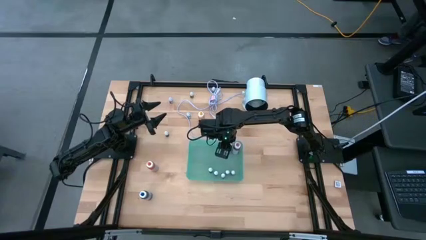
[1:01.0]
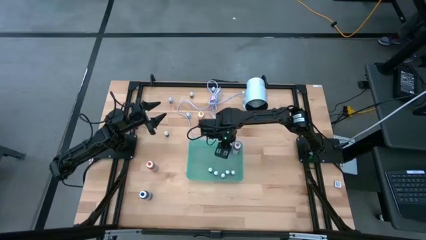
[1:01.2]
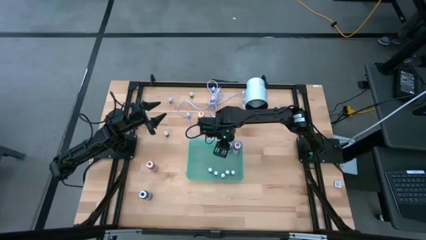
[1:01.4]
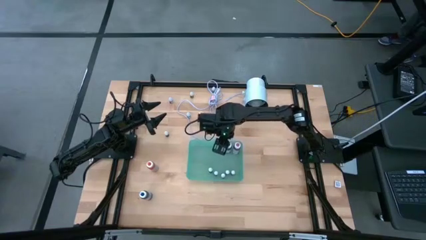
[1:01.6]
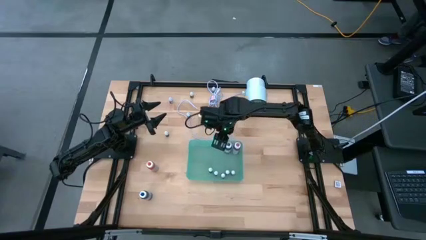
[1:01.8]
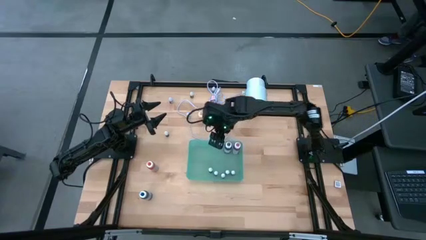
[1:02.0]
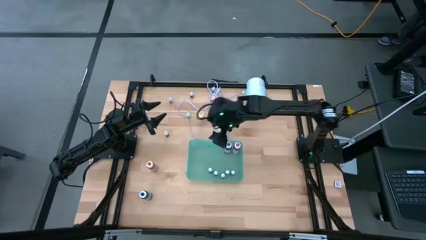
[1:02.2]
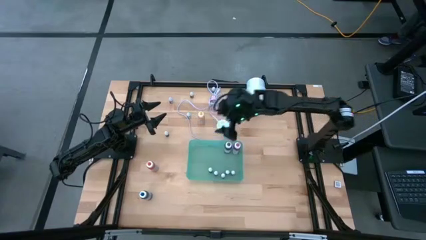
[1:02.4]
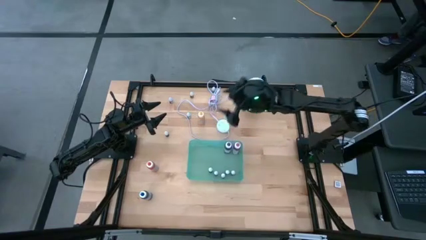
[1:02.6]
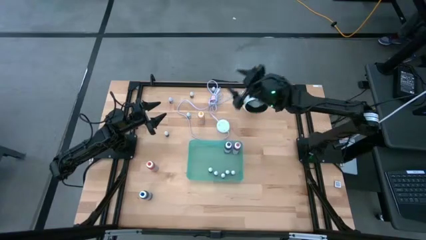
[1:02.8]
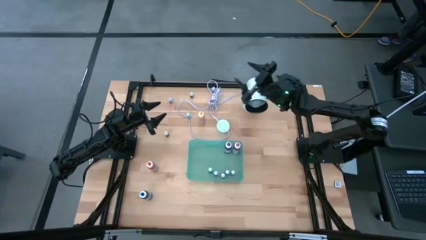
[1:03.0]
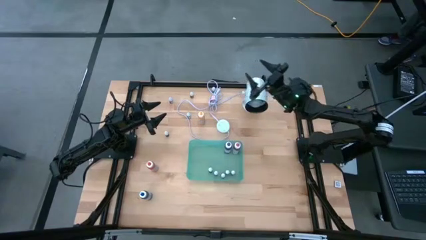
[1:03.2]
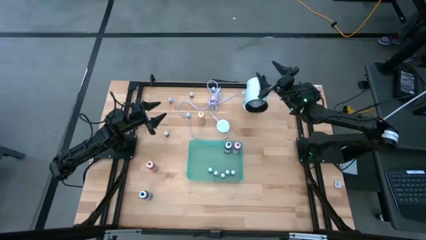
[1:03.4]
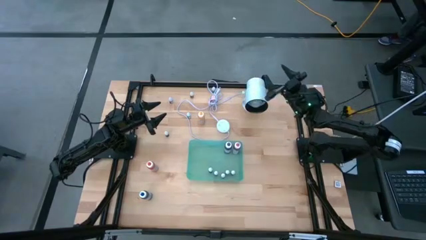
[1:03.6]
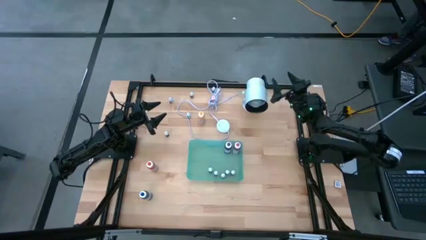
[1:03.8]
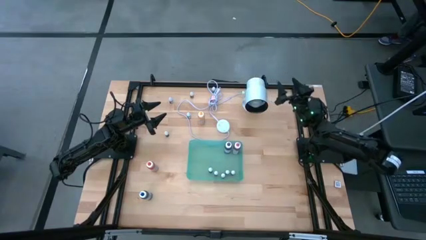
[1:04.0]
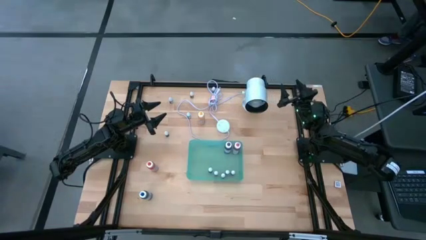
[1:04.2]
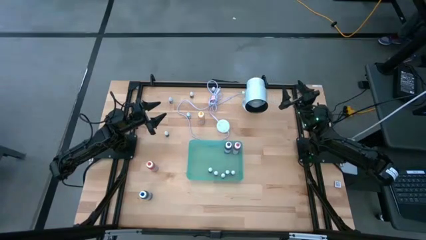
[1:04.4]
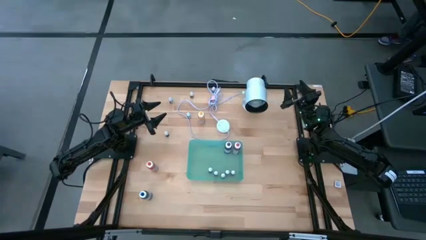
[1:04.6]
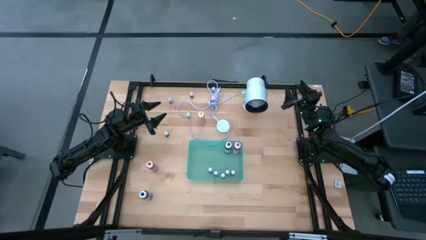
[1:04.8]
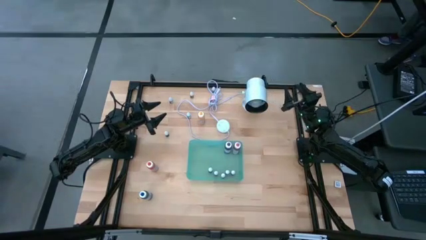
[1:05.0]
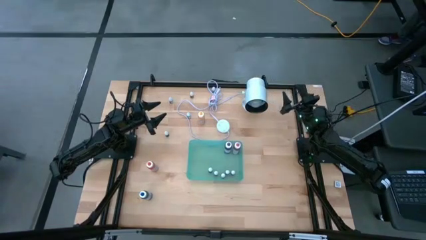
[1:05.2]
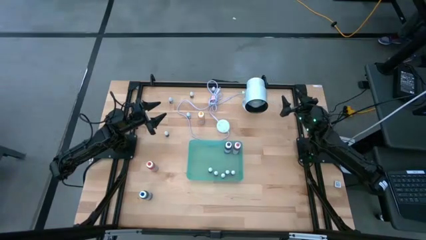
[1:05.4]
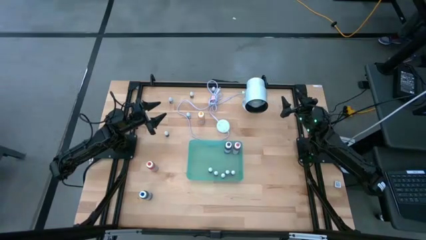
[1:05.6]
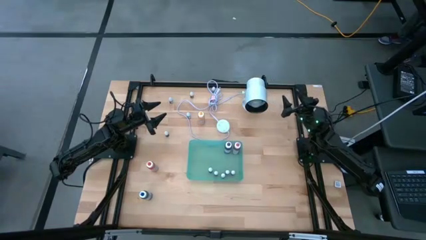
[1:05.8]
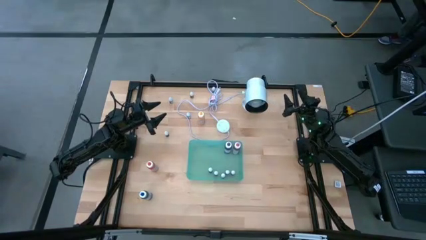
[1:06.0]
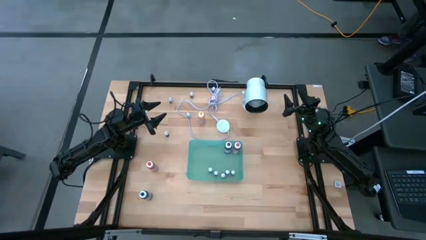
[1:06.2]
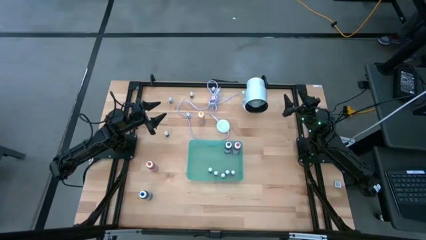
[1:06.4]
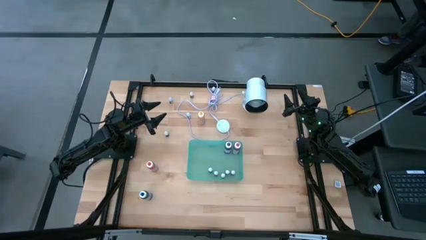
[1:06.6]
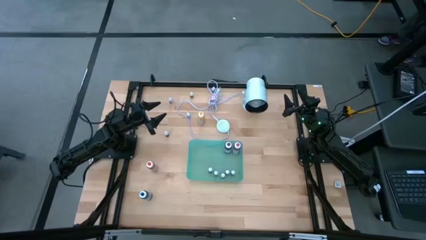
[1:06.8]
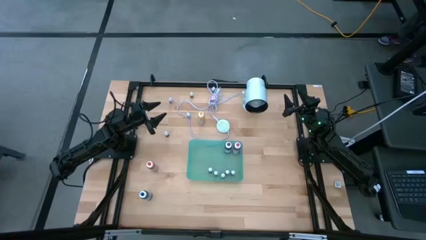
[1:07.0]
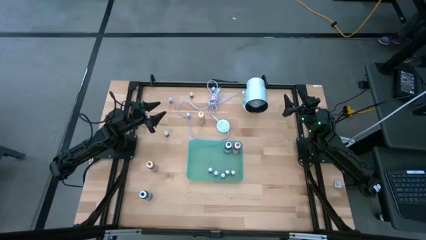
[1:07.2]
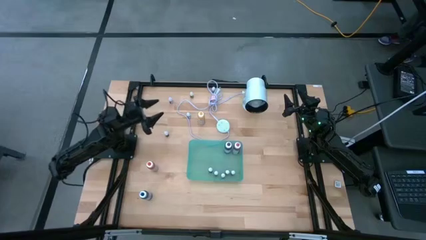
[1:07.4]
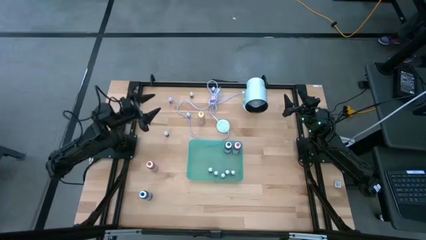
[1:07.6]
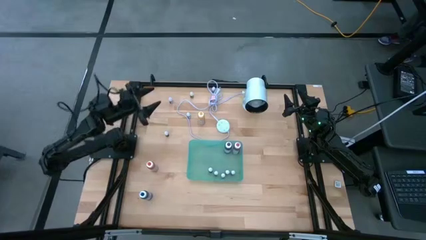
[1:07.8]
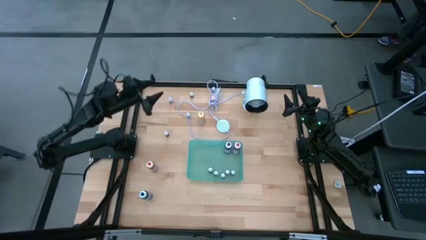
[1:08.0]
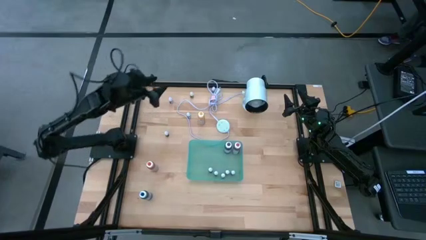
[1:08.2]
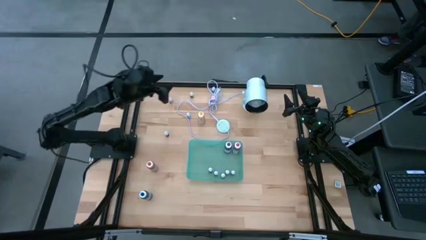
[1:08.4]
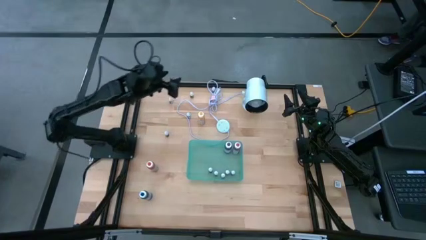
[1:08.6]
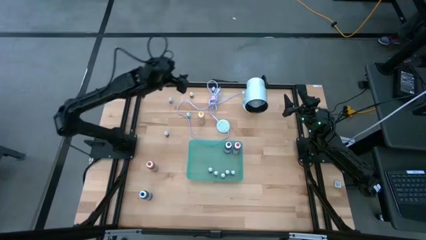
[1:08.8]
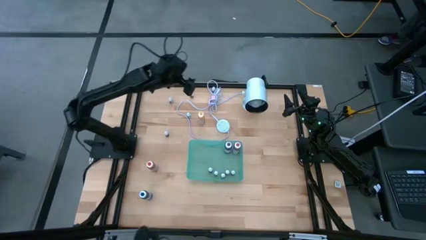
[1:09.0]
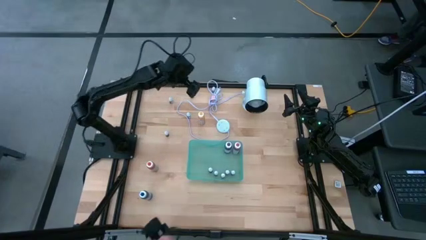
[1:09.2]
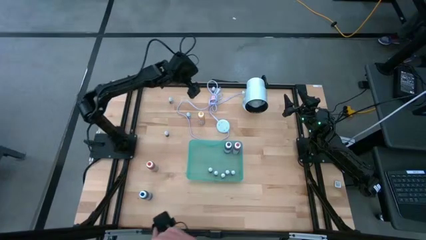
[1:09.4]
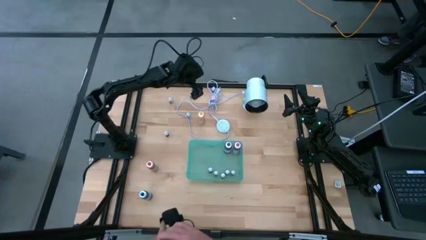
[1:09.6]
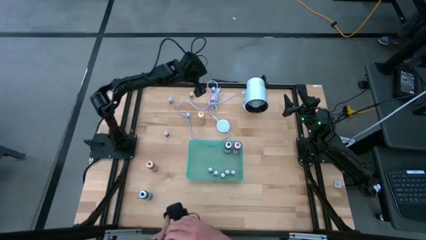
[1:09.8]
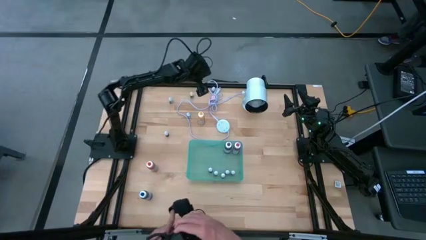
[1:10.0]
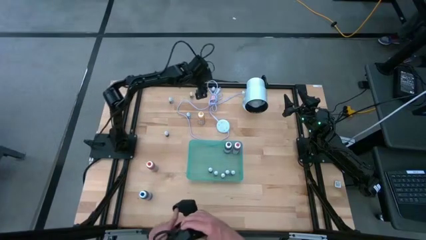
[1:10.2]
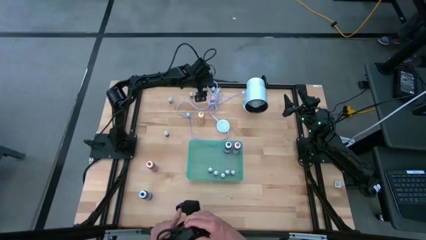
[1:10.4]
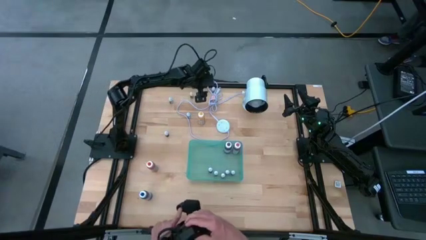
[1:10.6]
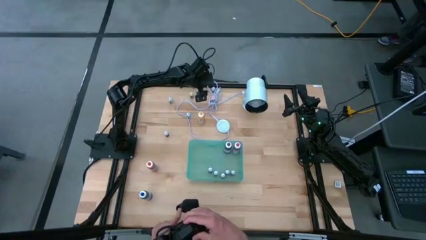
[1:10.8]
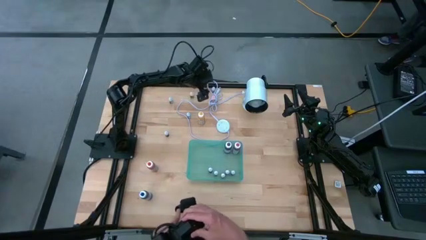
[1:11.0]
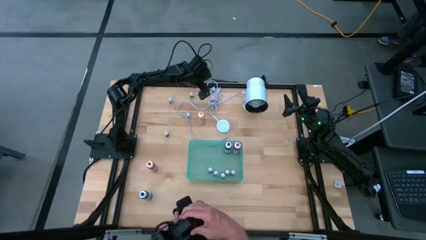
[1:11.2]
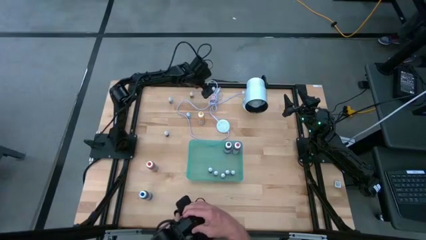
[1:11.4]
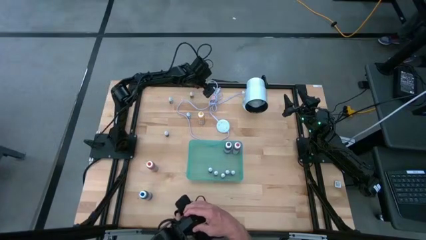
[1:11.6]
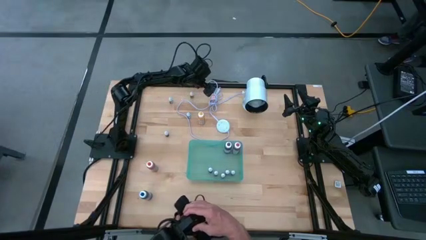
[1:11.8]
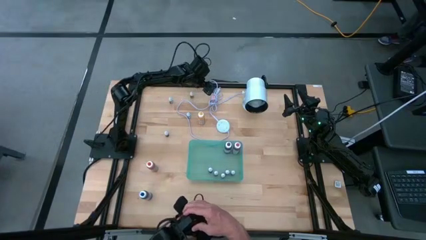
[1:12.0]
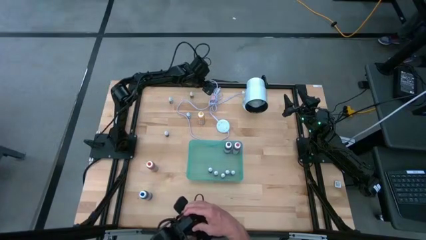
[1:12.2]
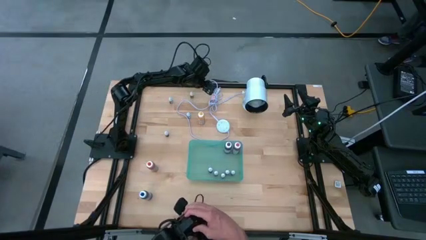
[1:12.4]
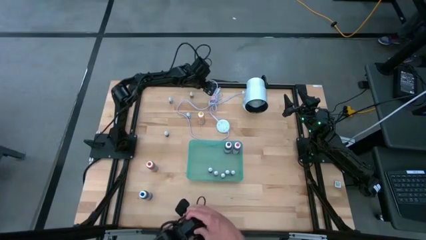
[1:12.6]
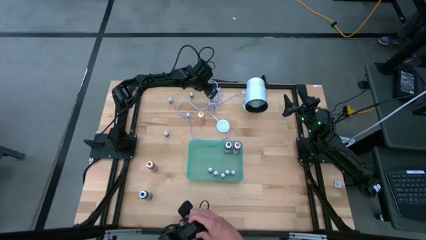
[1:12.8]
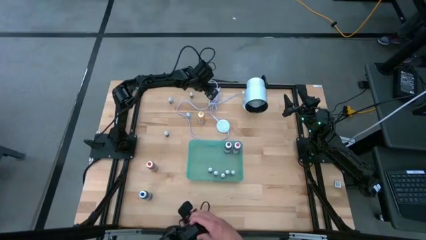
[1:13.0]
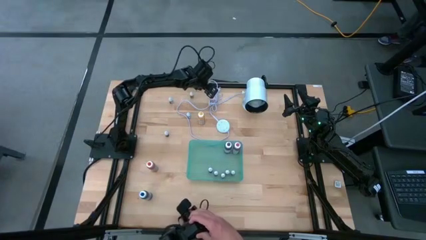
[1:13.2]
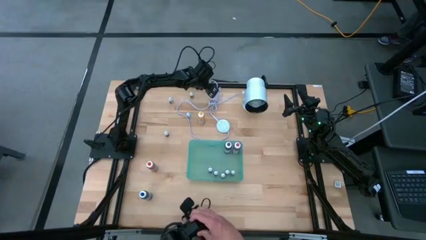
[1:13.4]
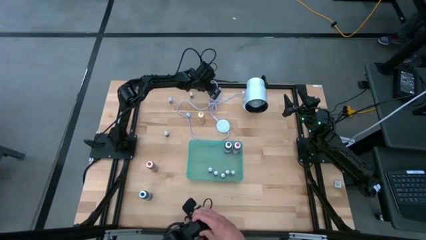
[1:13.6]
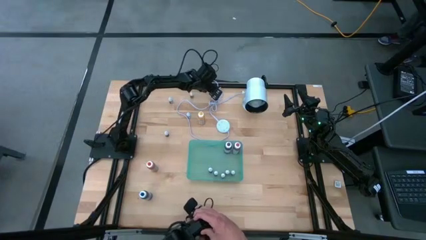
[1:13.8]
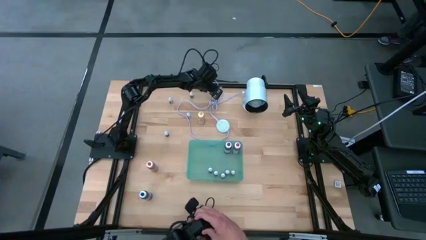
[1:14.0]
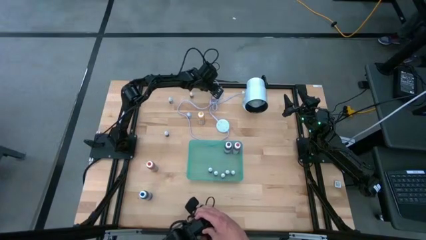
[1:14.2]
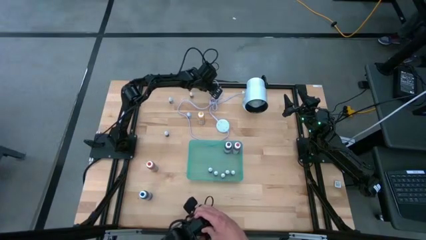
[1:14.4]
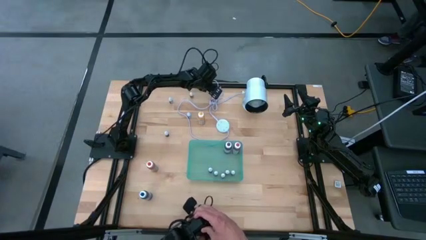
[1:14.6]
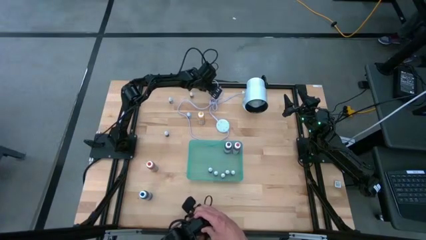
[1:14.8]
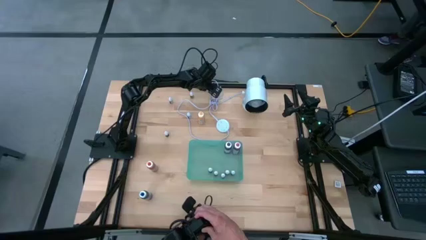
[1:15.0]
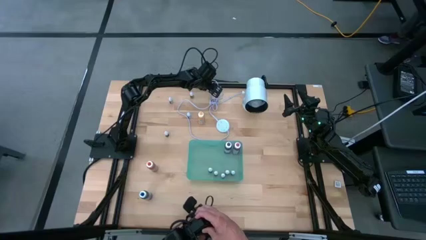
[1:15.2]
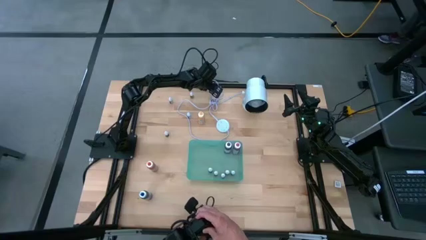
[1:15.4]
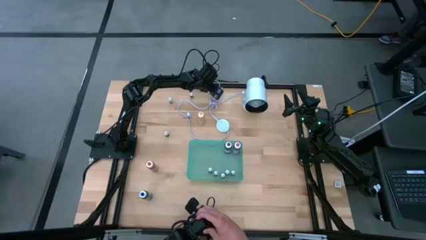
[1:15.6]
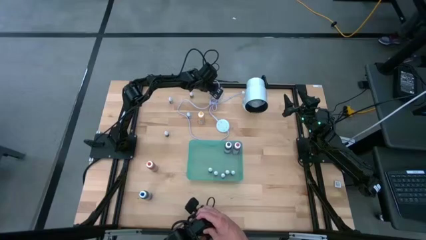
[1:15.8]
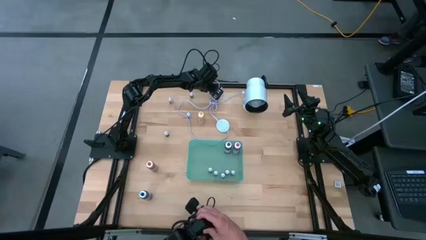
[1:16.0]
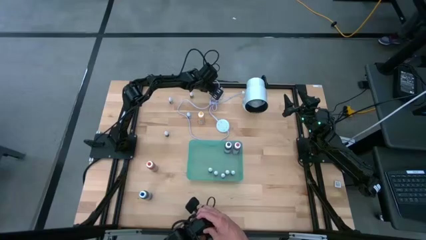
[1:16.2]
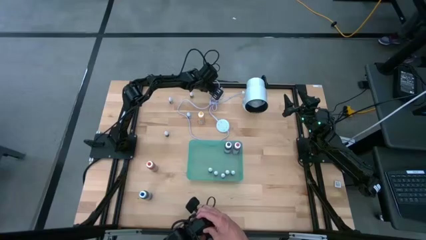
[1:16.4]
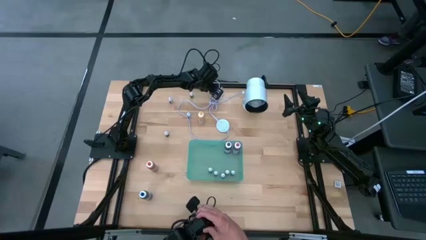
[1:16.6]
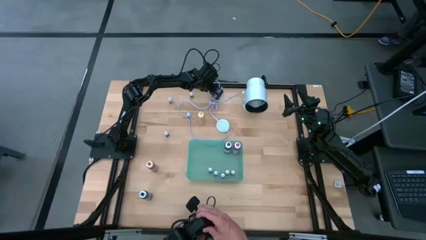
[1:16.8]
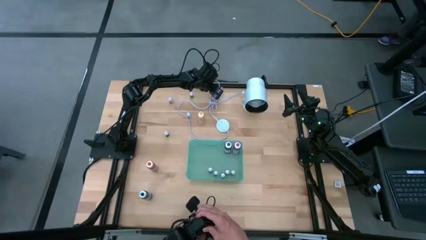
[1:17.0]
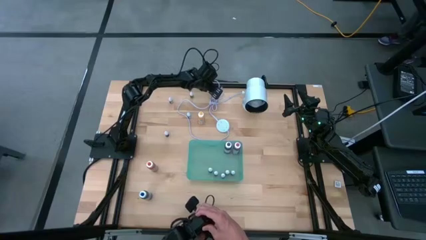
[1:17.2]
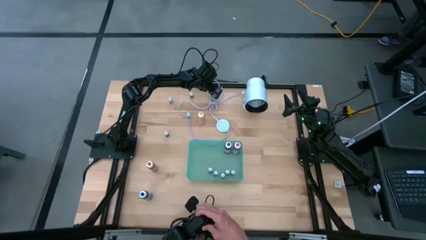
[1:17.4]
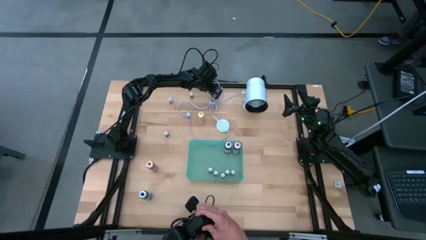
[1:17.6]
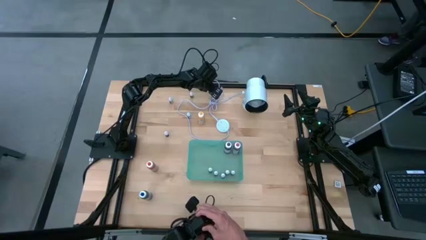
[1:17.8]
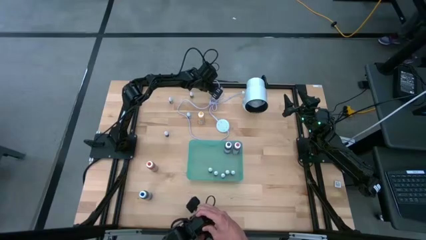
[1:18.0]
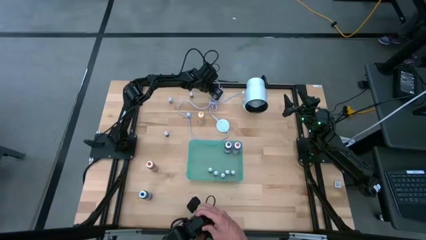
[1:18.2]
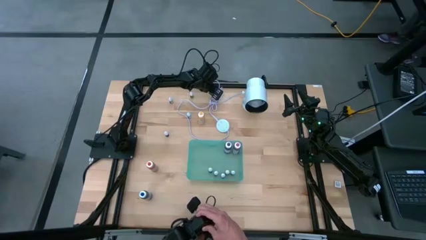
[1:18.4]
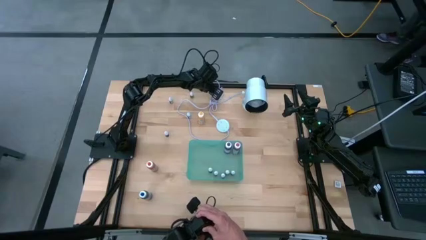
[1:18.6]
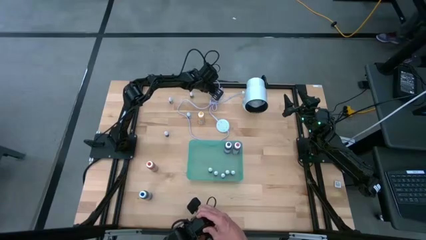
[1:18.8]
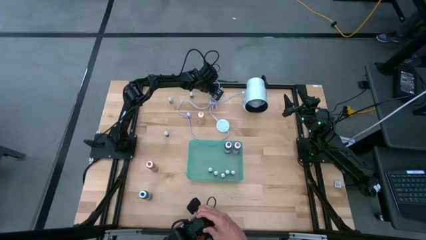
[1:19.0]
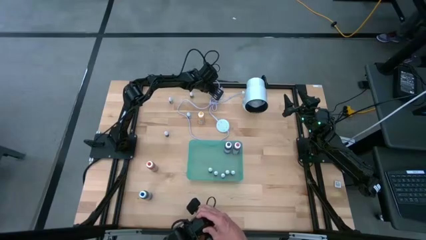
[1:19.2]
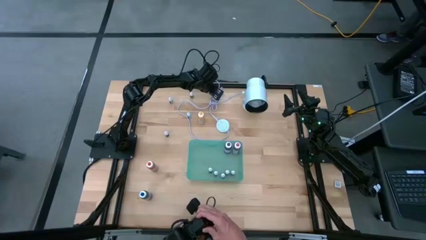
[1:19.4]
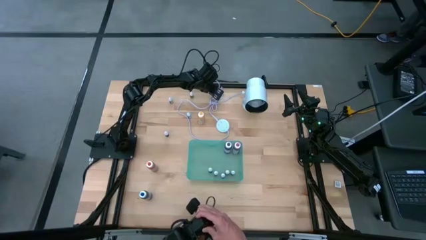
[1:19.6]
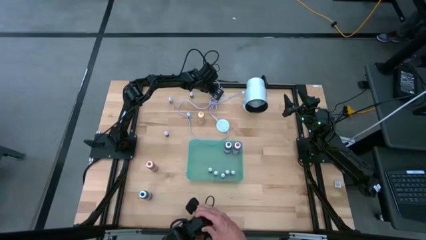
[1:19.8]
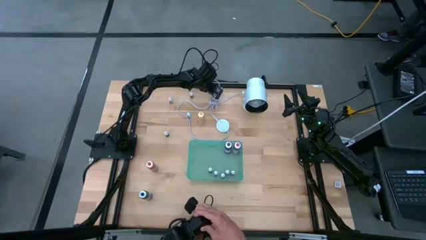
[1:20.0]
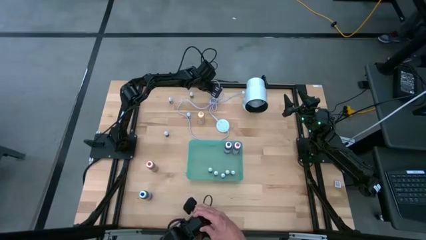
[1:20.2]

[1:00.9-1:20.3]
Task: Pick & Place food coloring
Put the top small blue food coloring bottle into the bin
